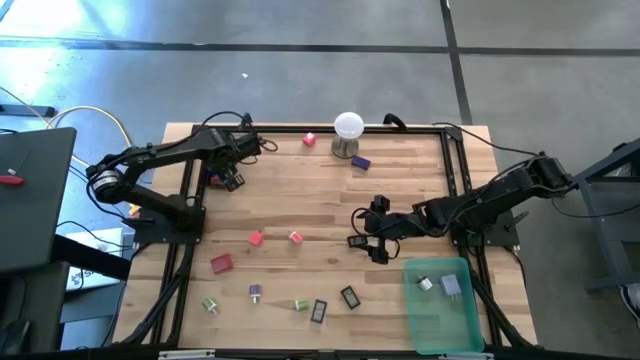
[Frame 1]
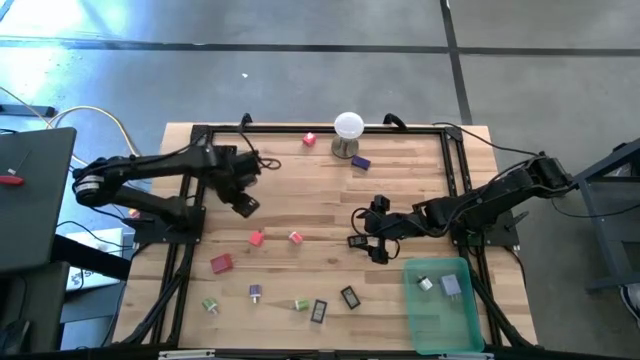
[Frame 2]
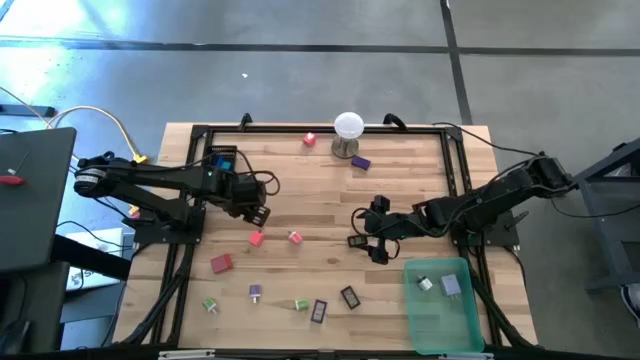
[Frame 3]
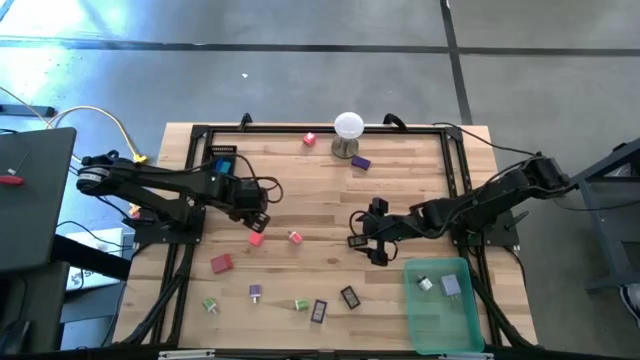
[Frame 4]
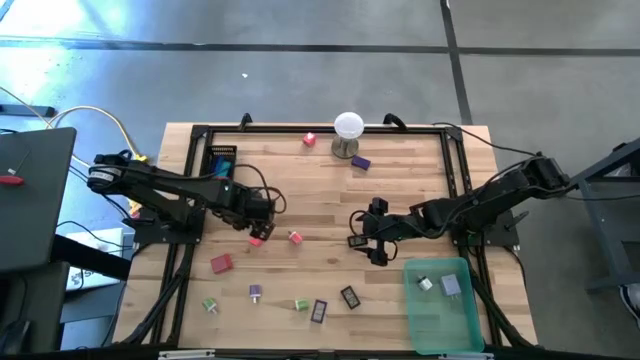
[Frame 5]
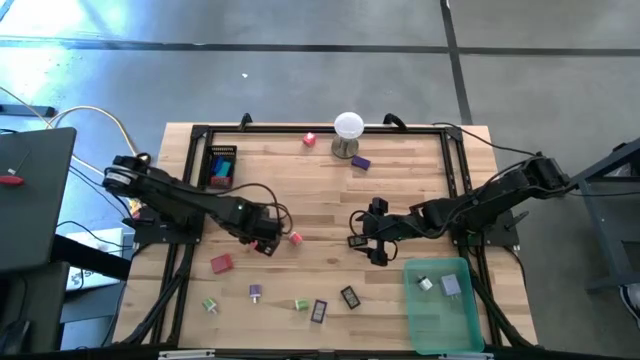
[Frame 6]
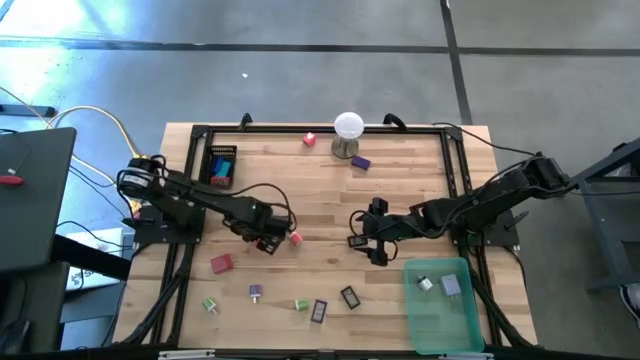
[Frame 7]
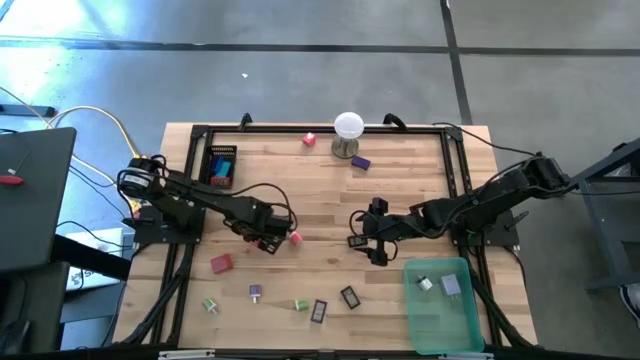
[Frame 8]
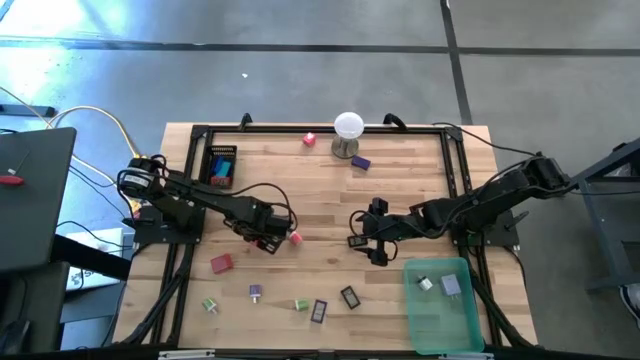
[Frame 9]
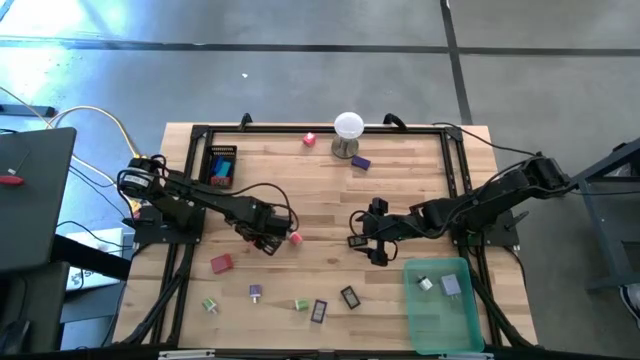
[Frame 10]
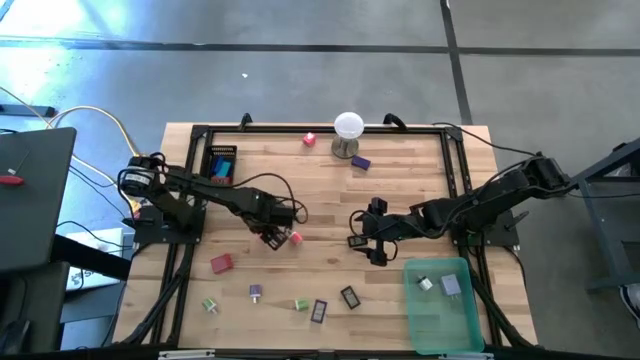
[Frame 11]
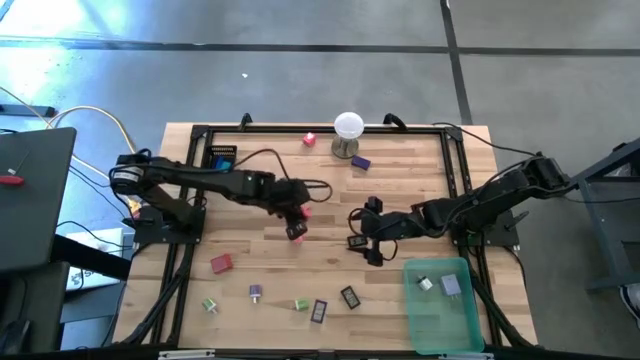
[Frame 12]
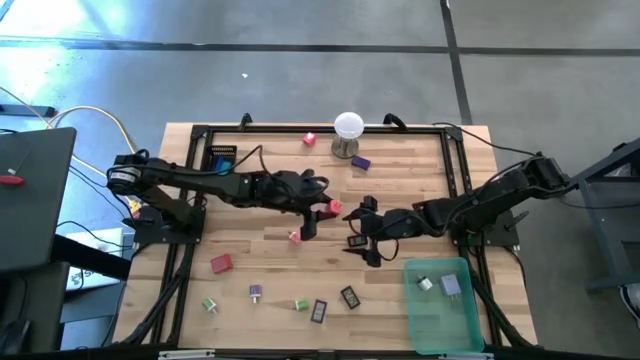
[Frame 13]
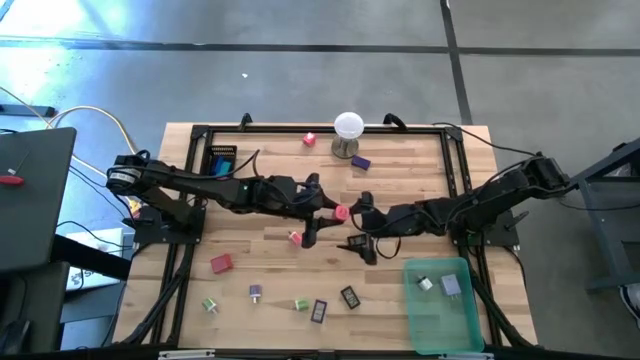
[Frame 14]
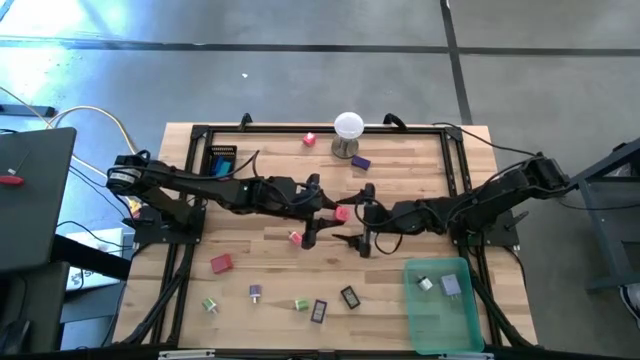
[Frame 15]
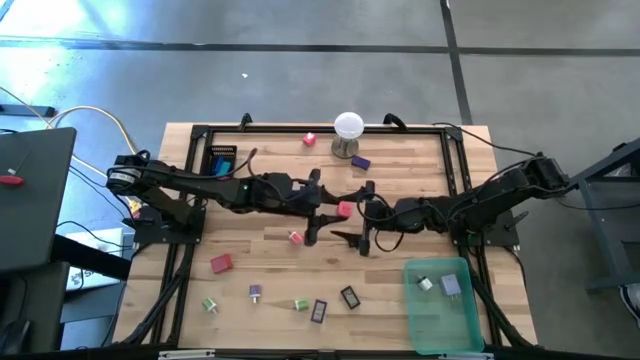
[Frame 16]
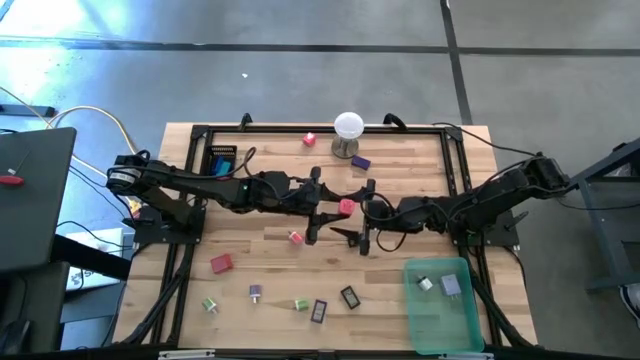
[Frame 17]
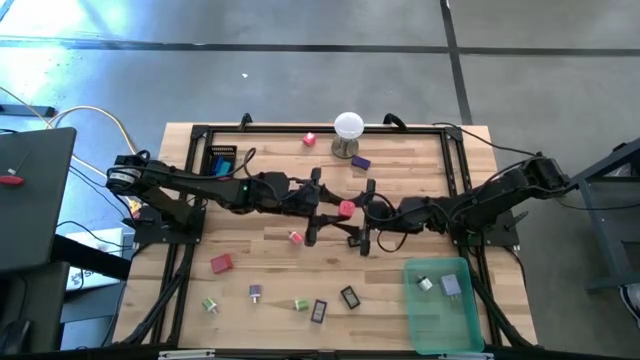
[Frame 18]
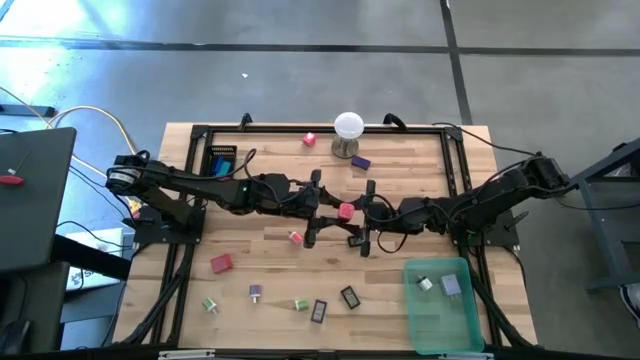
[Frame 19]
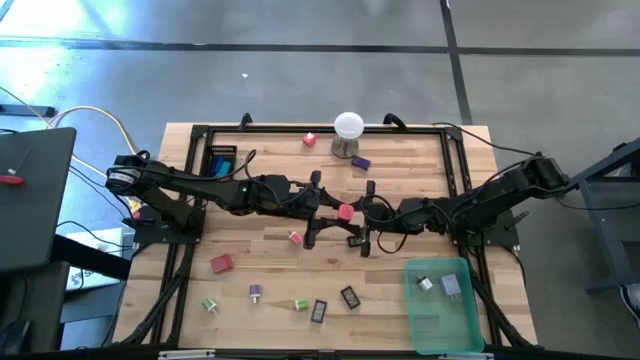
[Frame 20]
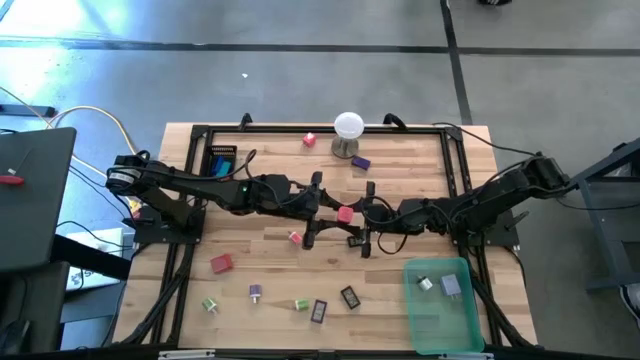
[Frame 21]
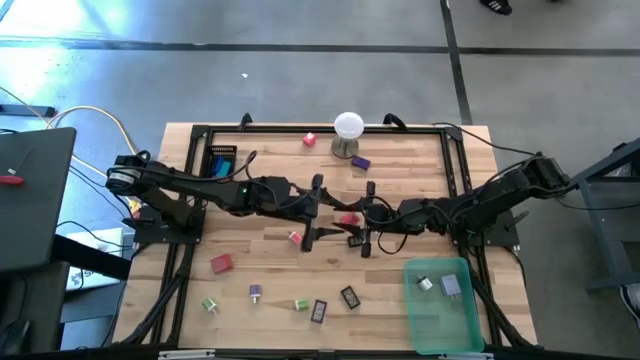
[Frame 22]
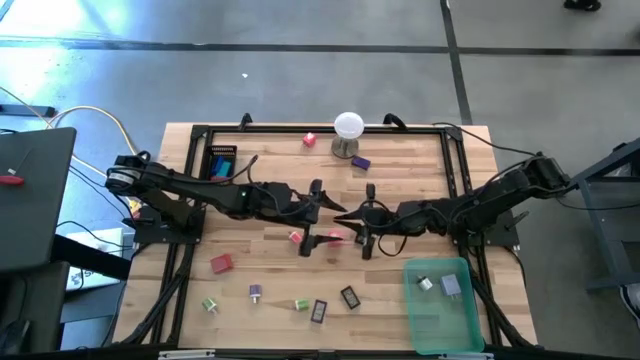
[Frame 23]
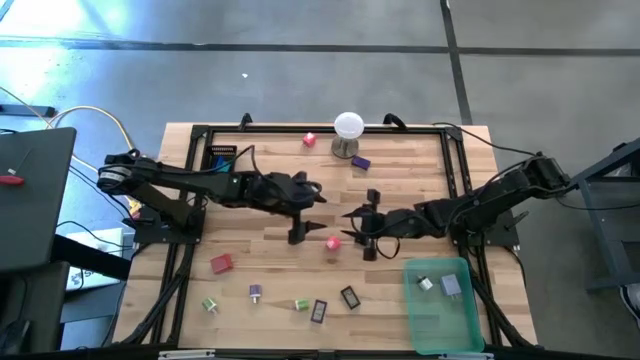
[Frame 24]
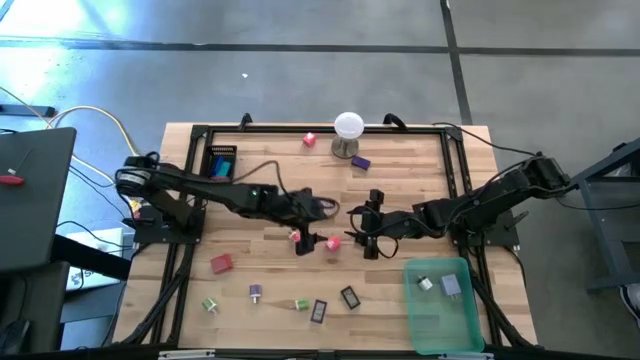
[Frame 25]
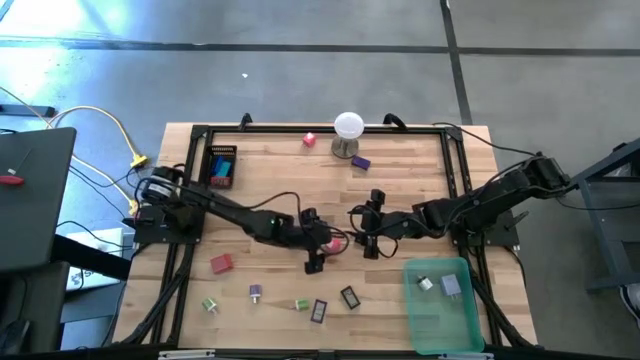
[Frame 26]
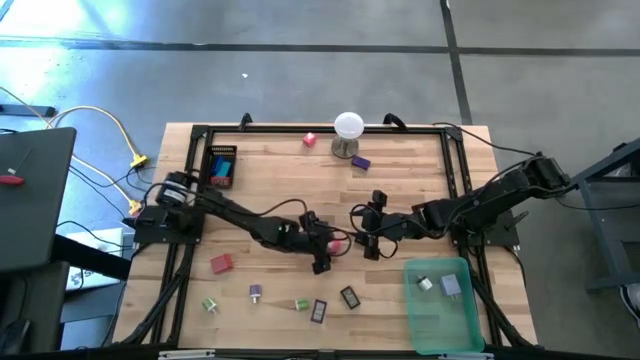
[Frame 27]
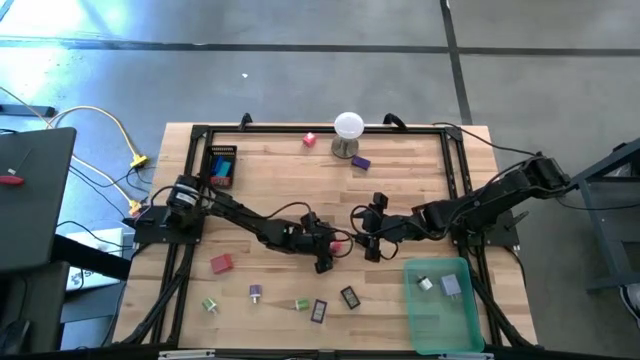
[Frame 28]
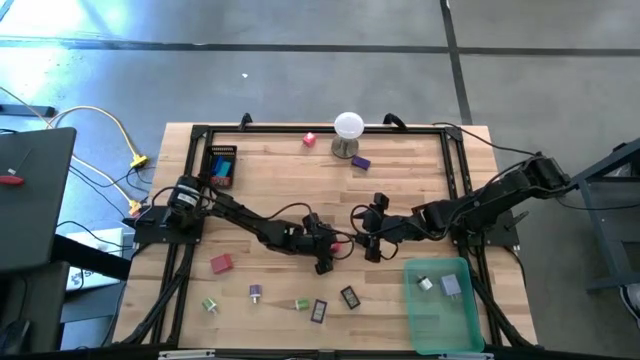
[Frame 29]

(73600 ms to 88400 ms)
Task: Pick & Place Office items
Put the bottom pink charger adapter into the green bin

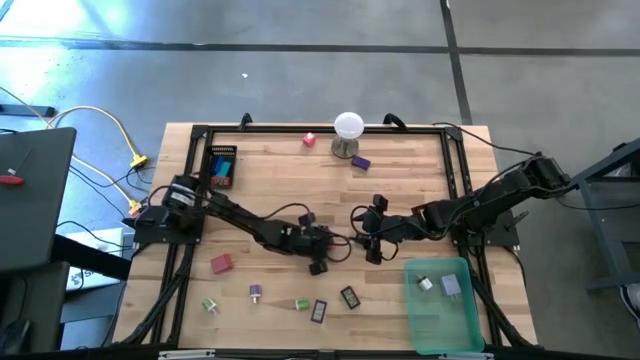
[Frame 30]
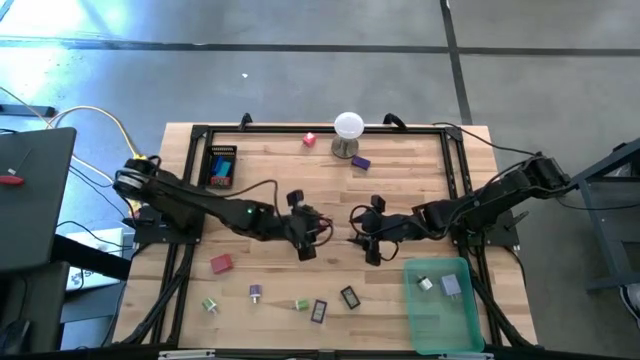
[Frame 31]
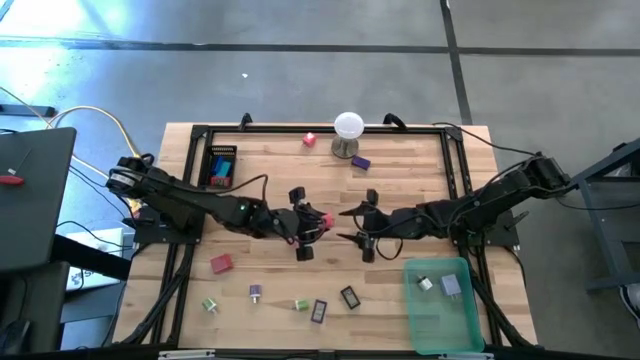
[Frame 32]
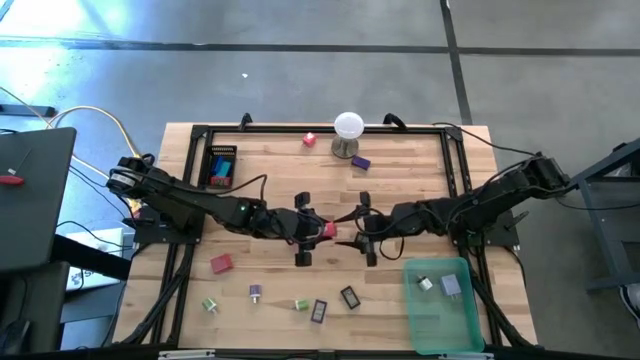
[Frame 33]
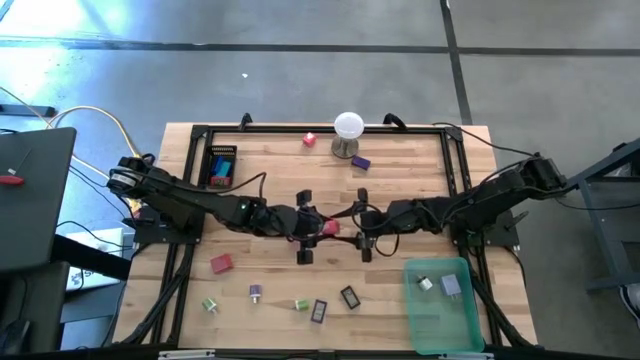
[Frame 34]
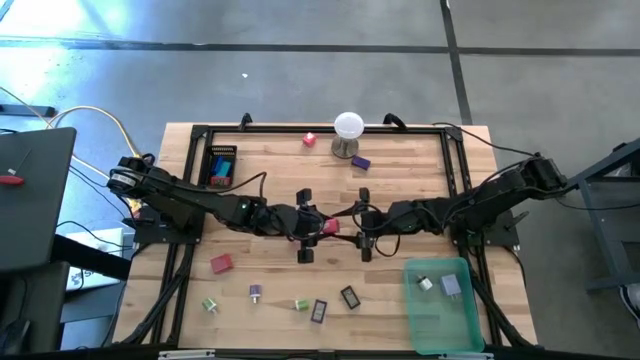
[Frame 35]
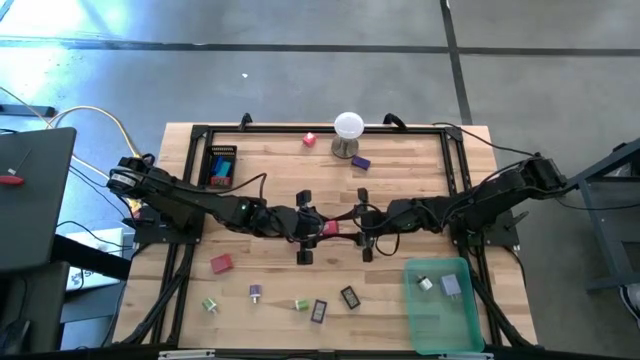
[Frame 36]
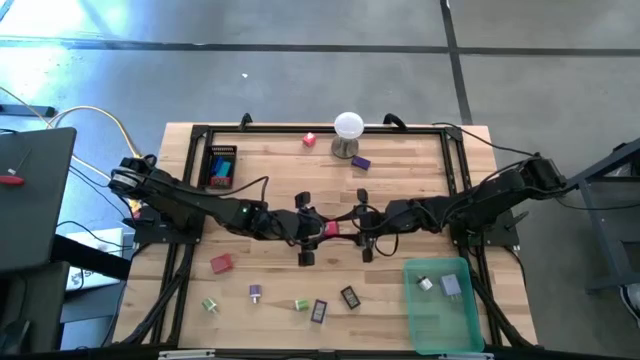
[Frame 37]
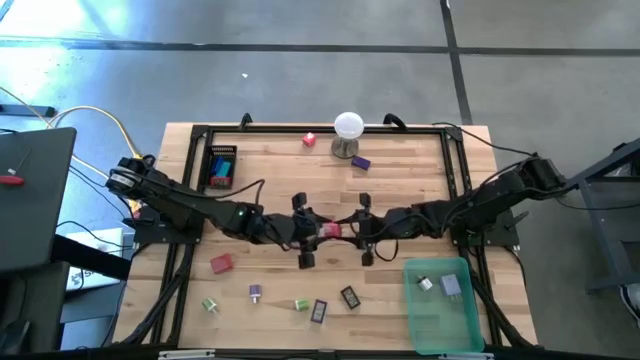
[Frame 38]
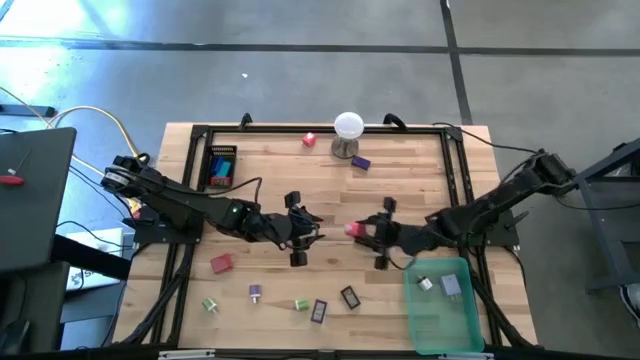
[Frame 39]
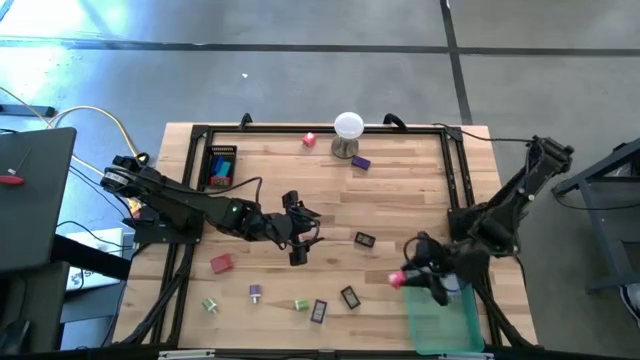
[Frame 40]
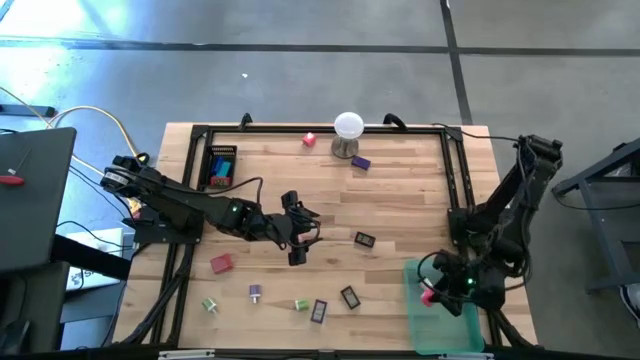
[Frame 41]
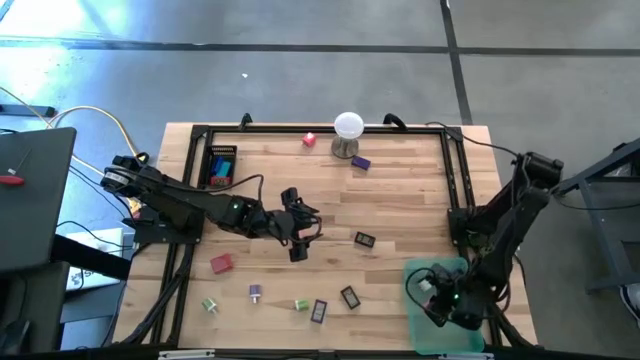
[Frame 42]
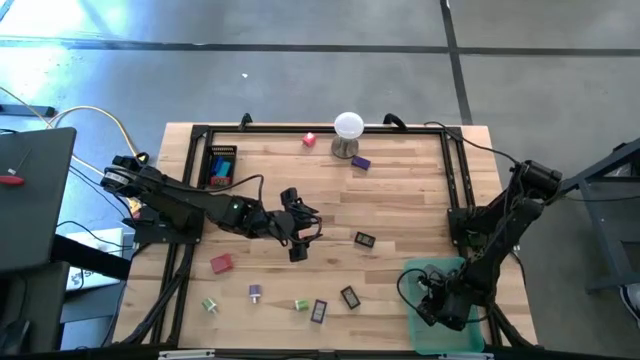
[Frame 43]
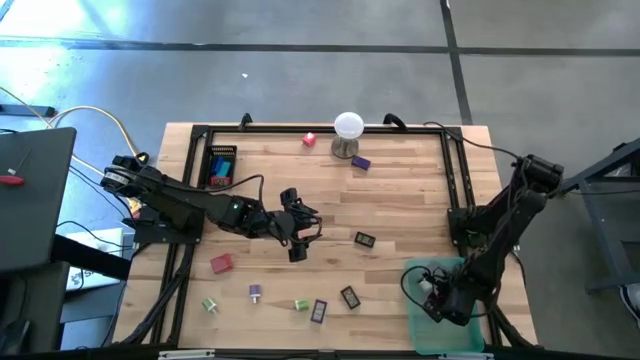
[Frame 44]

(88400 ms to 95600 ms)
Put the bottom pink charger adapter into the green bin
